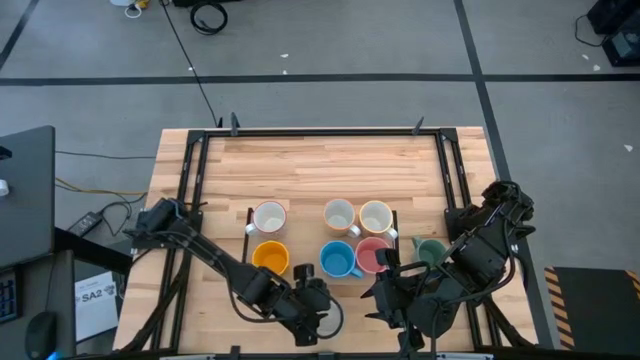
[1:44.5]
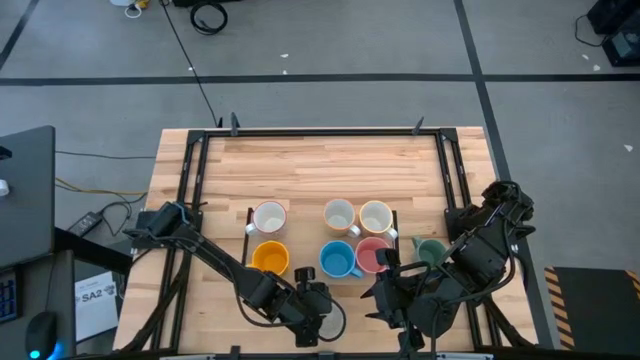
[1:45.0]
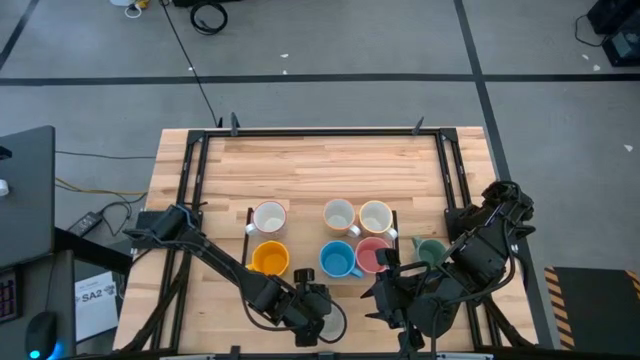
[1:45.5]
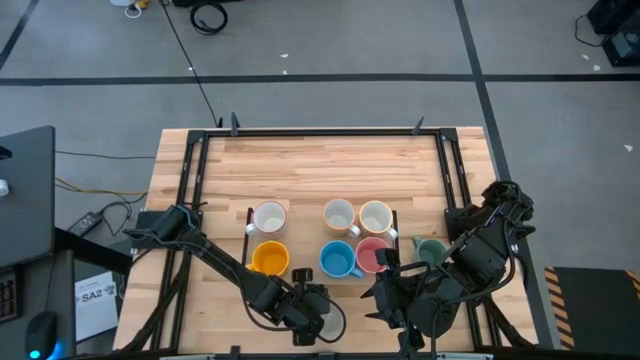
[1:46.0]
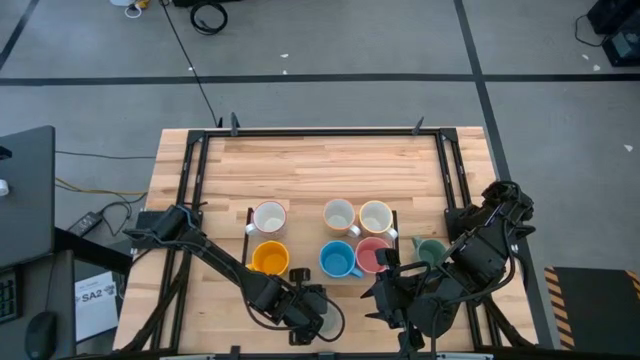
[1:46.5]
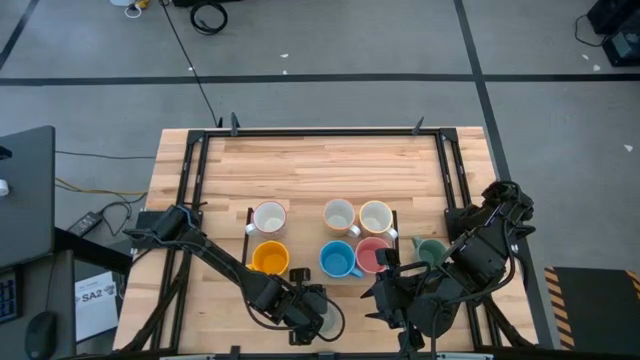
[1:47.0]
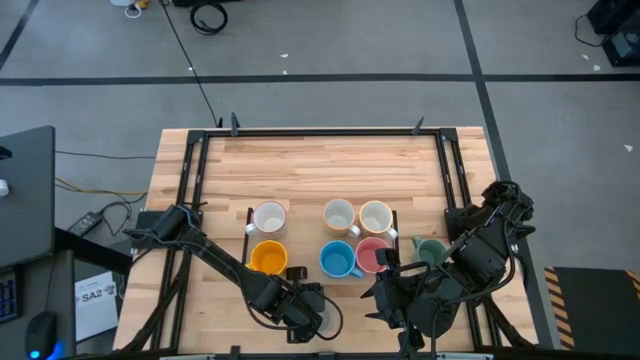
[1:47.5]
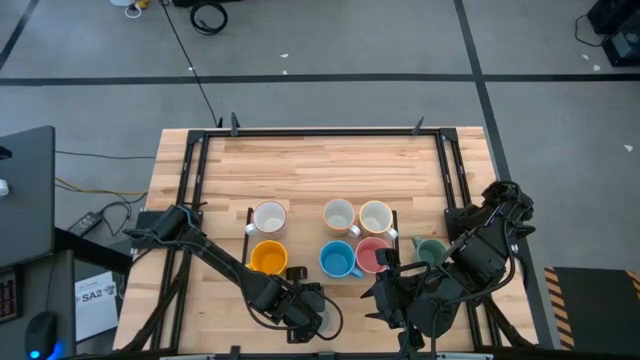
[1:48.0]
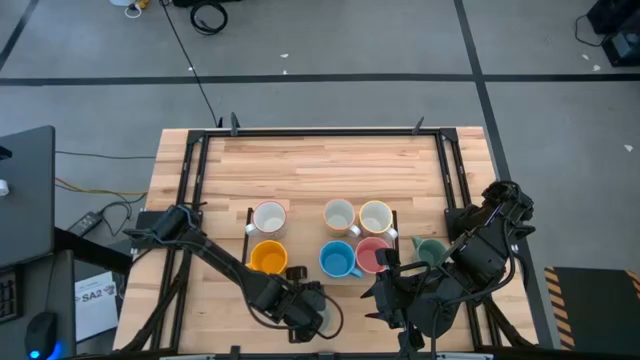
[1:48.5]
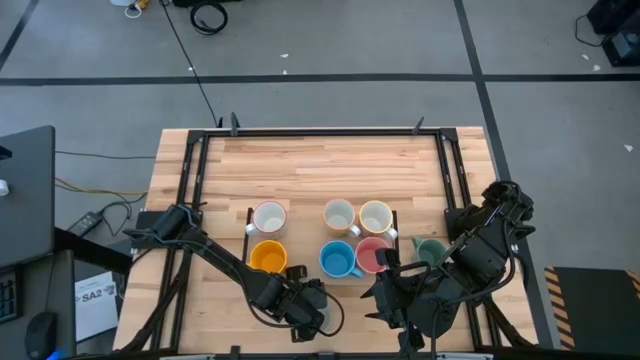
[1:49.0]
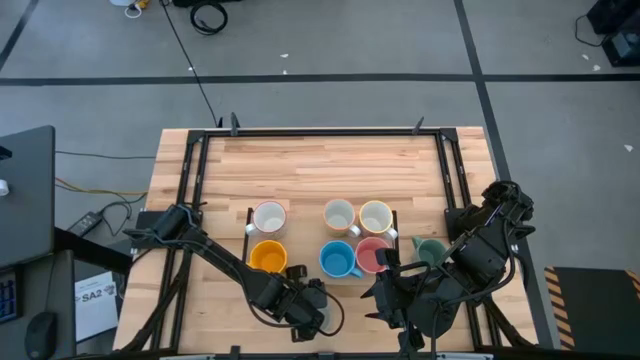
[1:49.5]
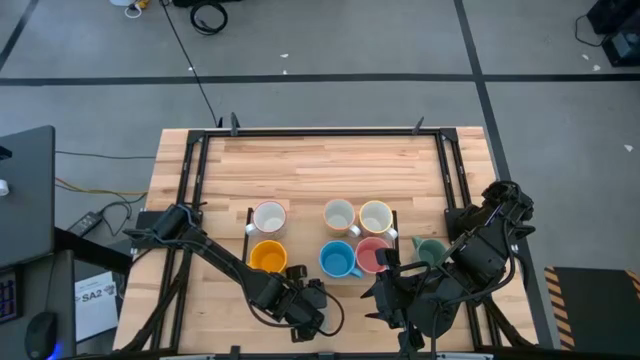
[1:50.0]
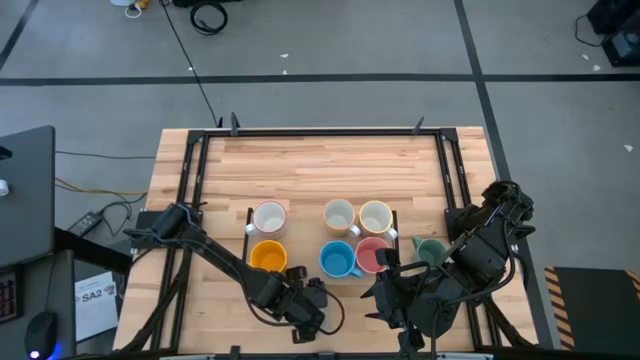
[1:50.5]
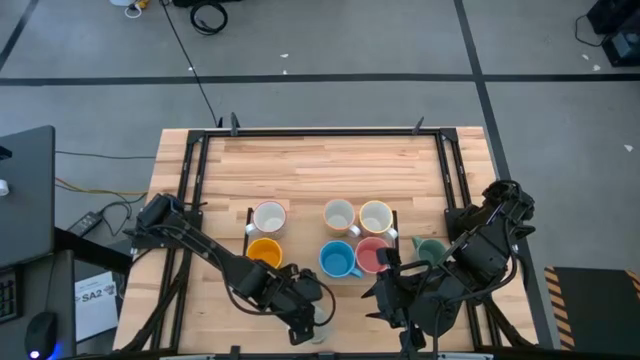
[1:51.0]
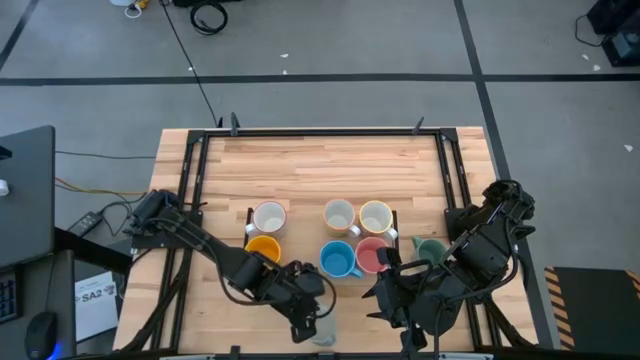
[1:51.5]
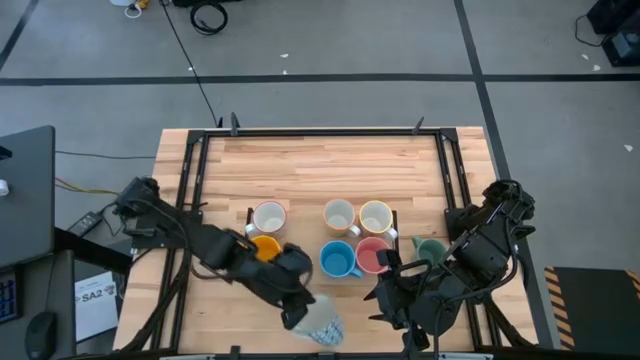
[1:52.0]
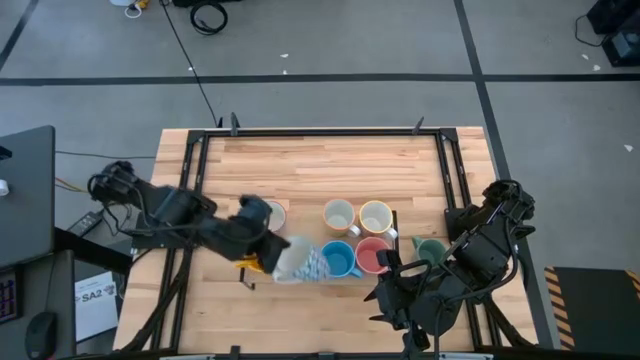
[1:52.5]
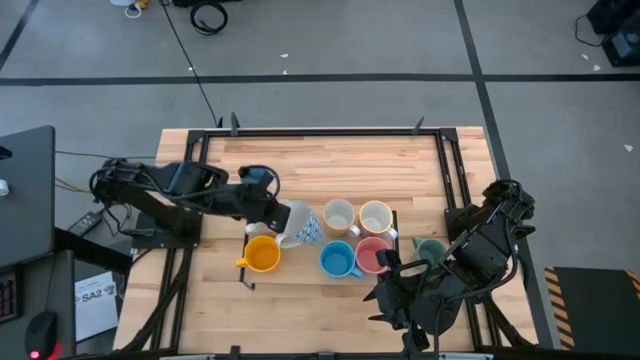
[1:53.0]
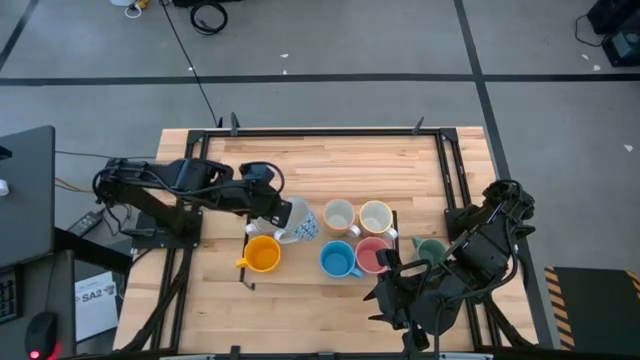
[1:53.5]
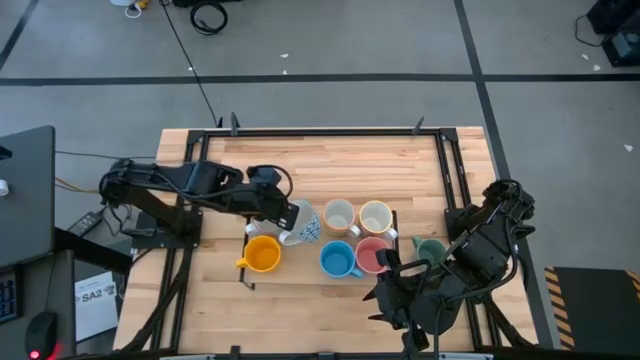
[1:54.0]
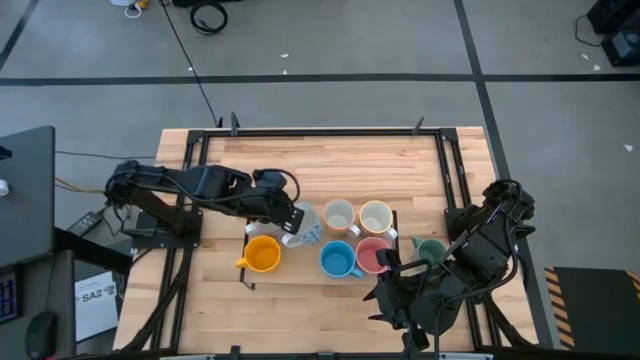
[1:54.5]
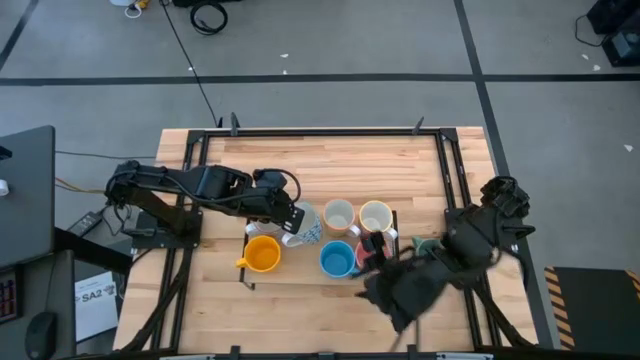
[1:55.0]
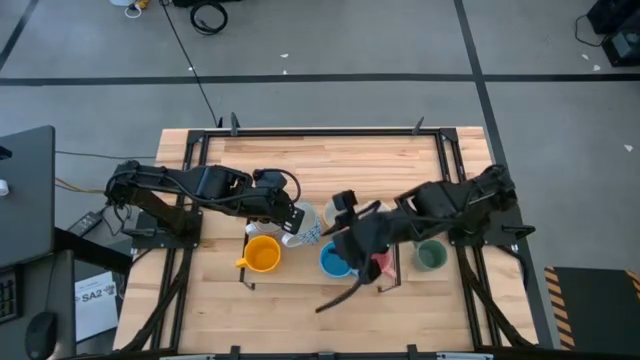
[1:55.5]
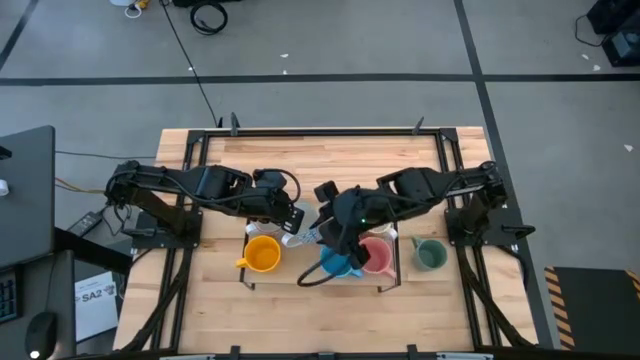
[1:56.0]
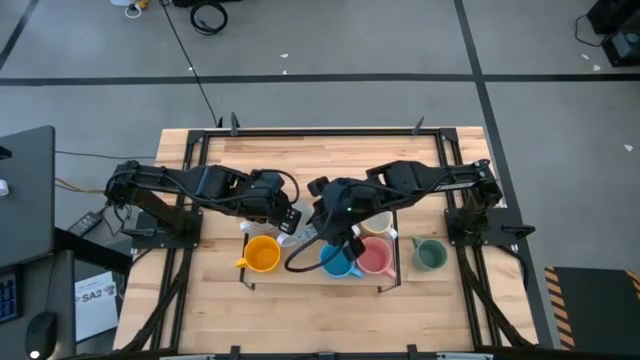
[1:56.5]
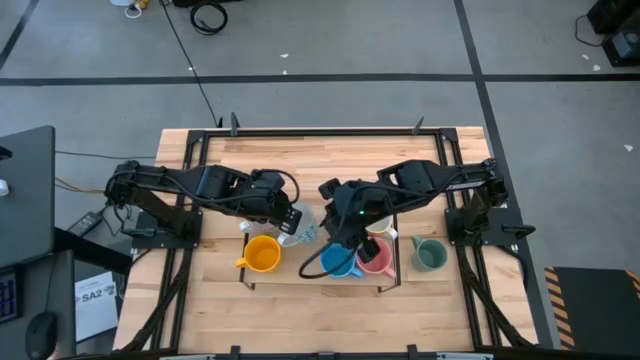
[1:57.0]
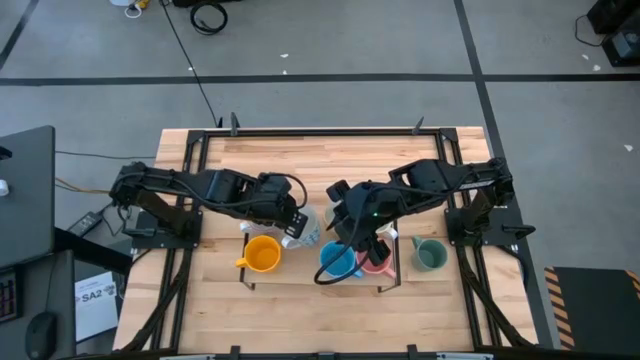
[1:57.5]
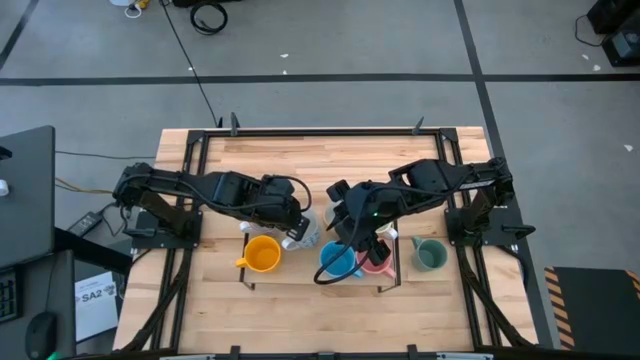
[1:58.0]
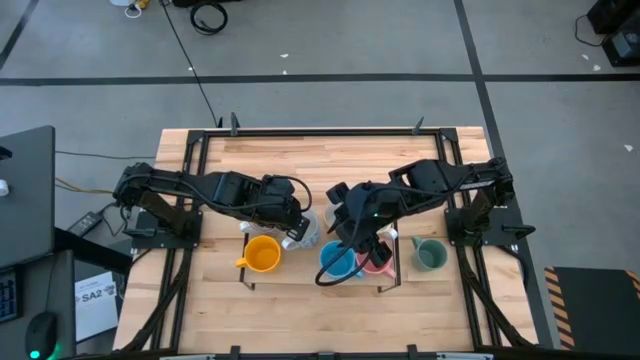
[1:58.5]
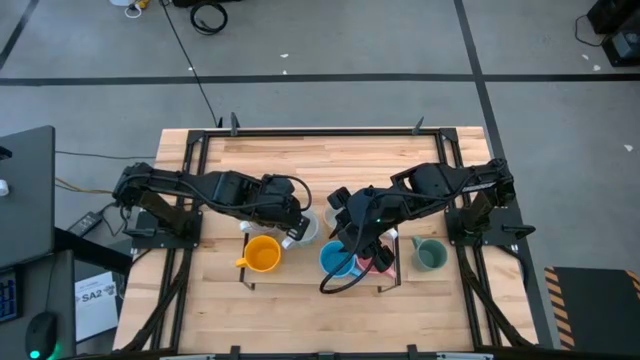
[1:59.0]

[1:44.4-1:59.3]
Task: Place coffee mugs
Put the blue patterned mug on the shelf

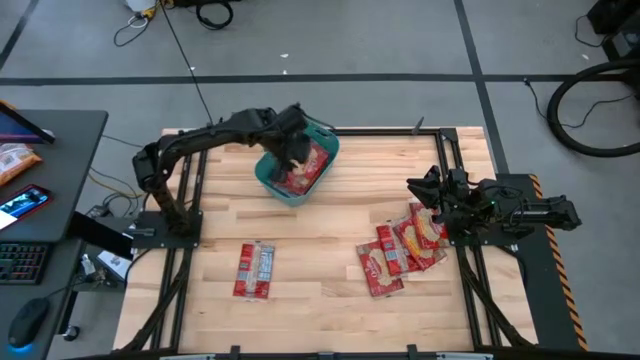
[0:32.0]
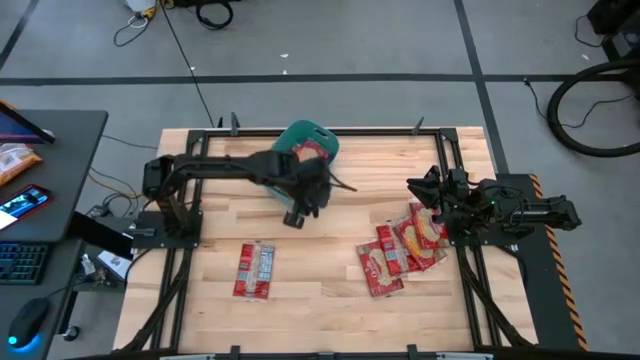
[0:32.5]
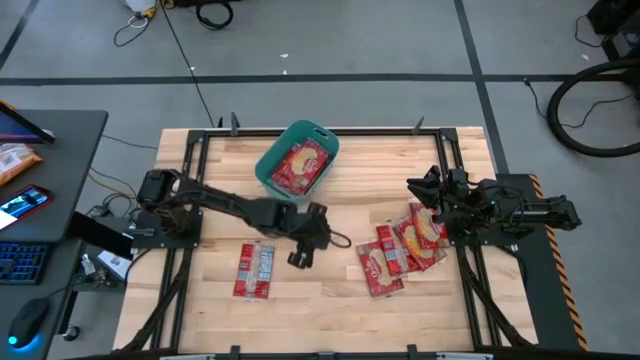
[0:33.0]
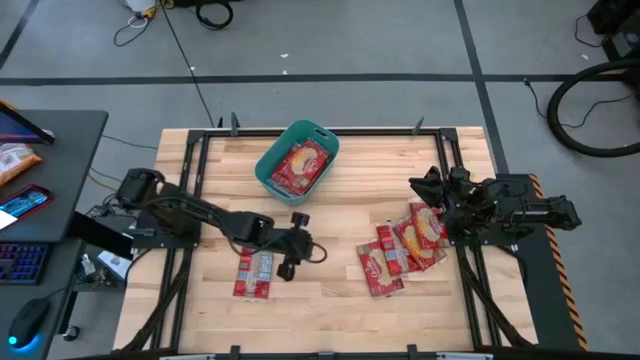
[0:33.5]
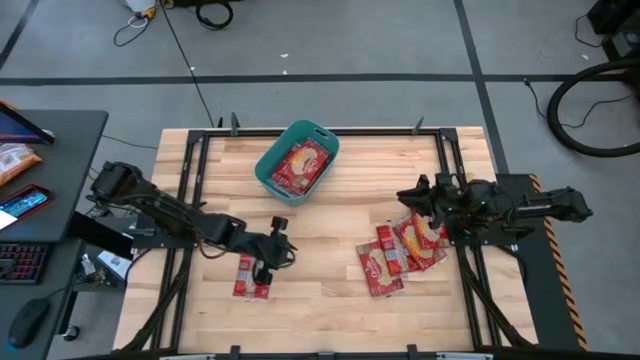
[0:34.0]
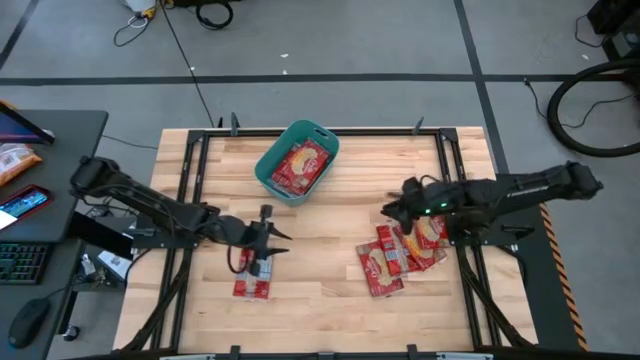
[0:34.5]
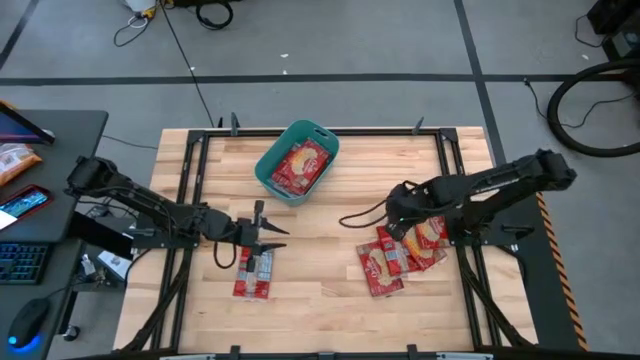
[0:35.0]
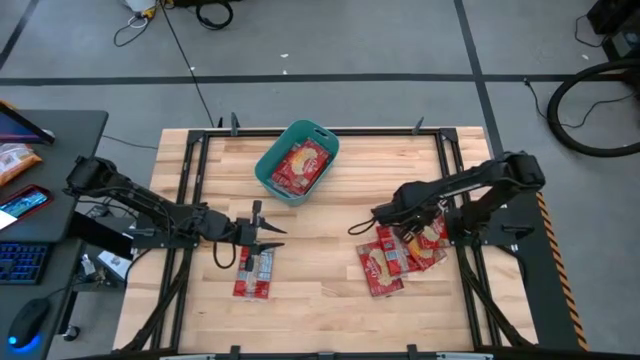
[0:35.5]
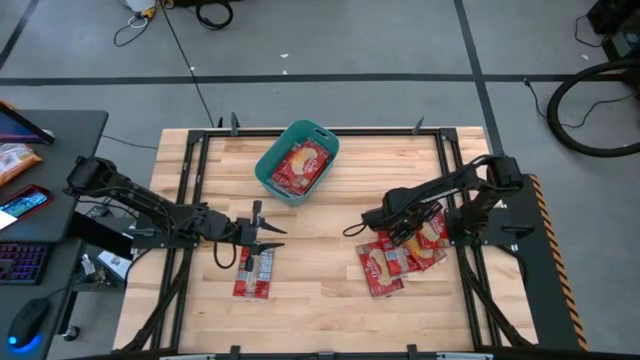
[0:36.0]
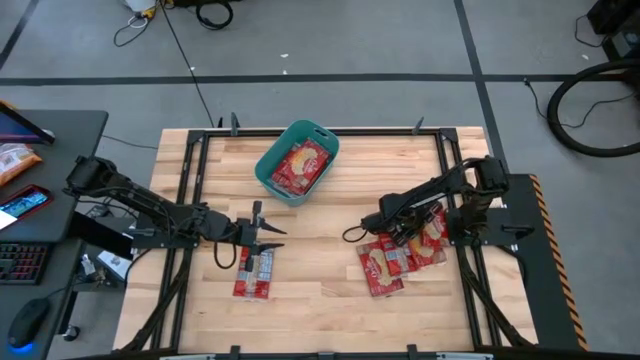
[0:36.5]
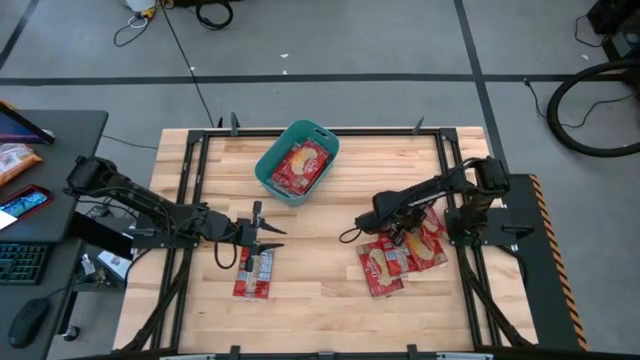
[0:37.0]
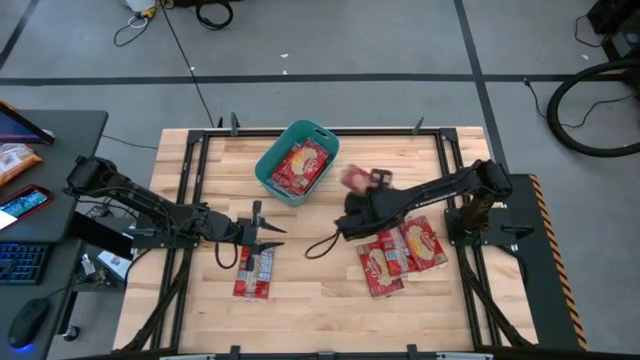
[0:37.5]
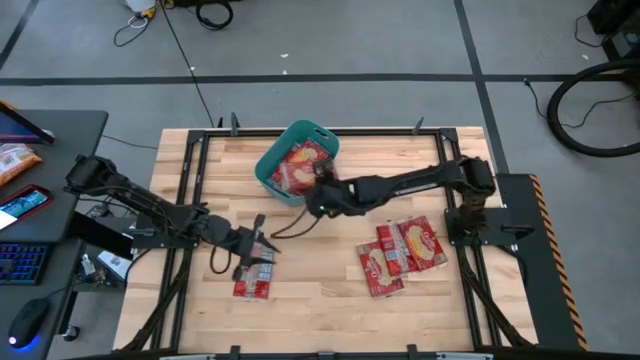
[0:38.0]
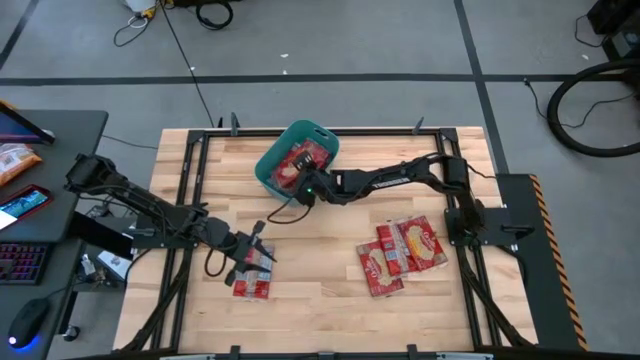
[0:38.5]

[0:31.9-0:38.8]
Task: Sort popcorn bags into baskets
Put the red popcorn bag into the blue bin
